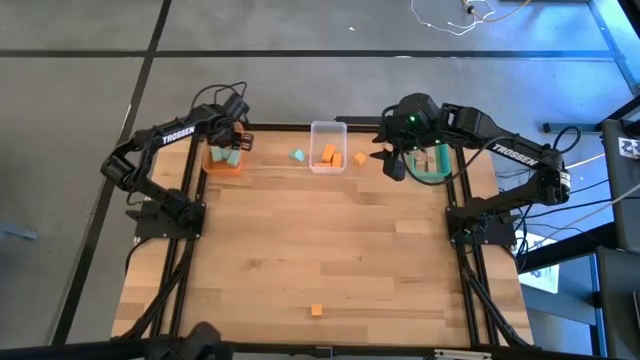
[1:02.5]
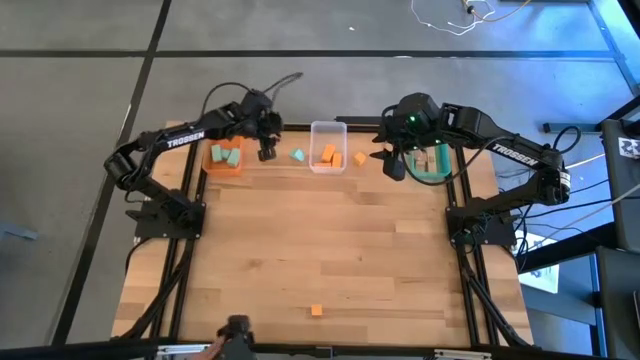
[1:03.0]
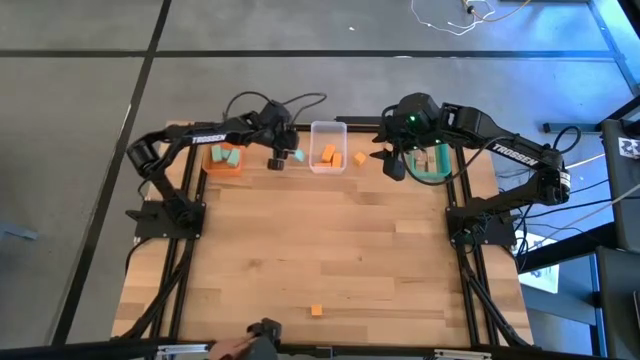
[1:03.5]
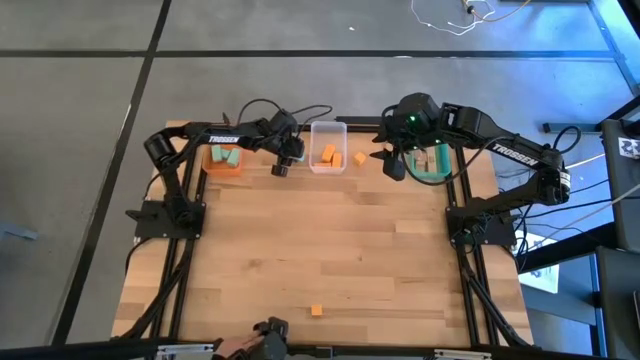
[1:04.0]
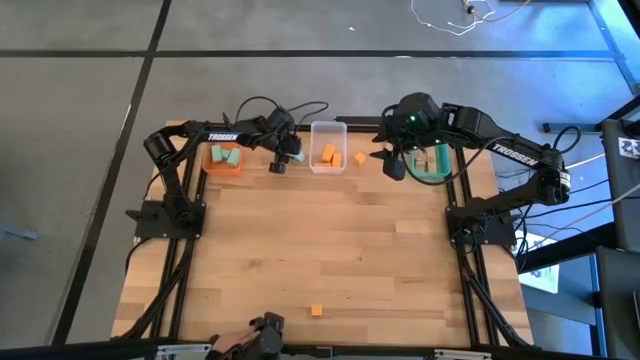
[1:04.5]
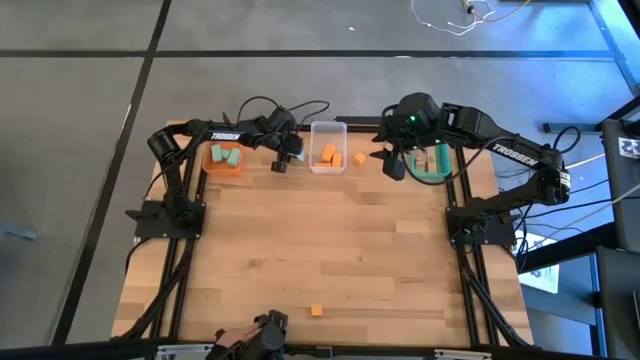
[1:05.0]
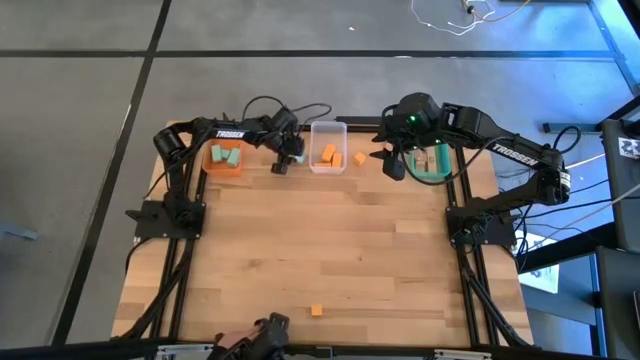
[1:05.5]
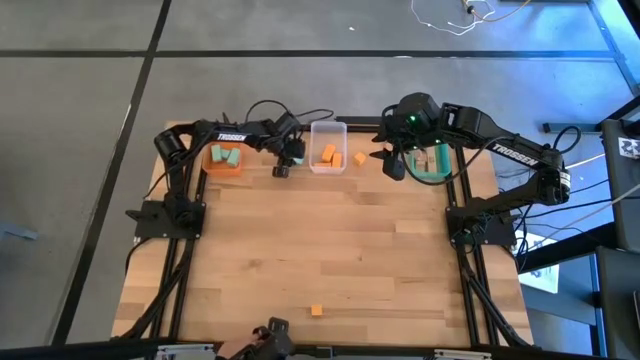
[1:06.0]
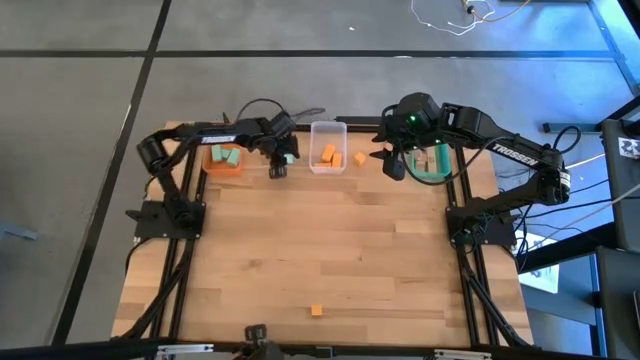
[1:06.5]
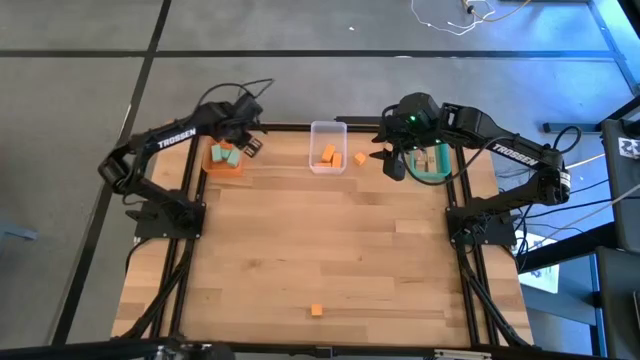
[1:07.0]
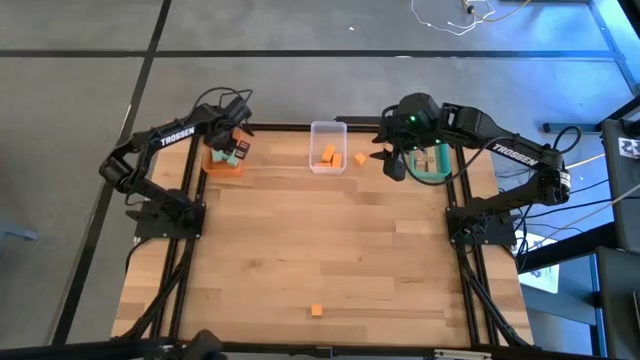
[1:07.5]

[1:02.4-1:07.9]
Task: Sort & place blocks by color
Put the blue block into the orange bin

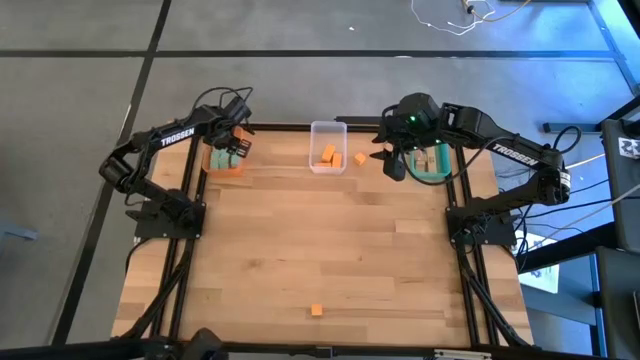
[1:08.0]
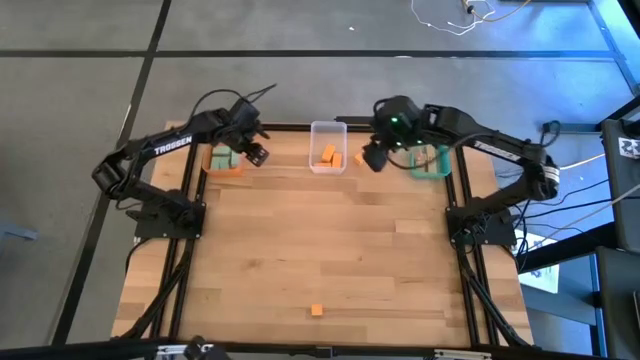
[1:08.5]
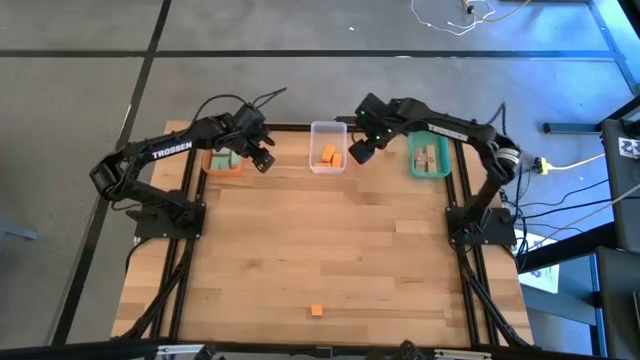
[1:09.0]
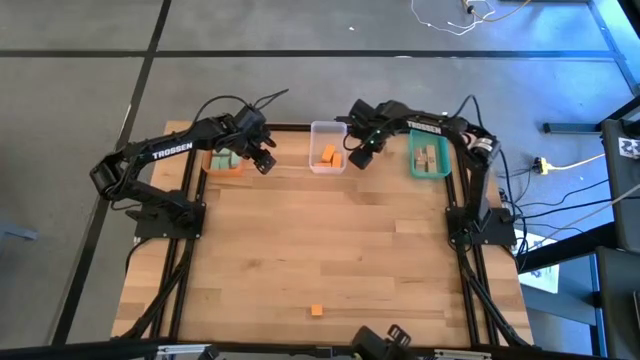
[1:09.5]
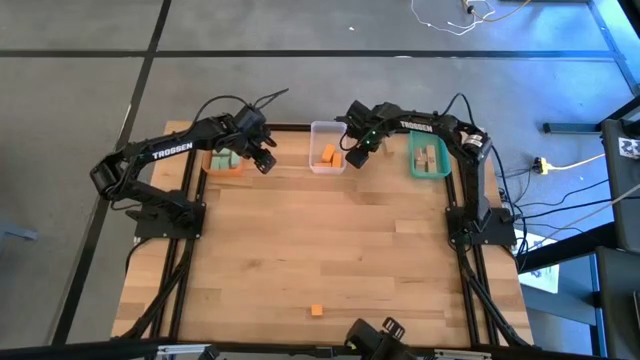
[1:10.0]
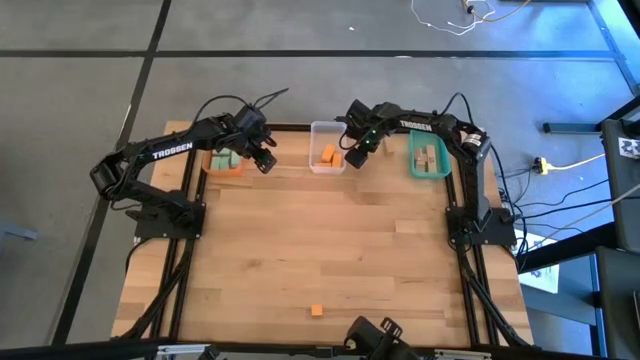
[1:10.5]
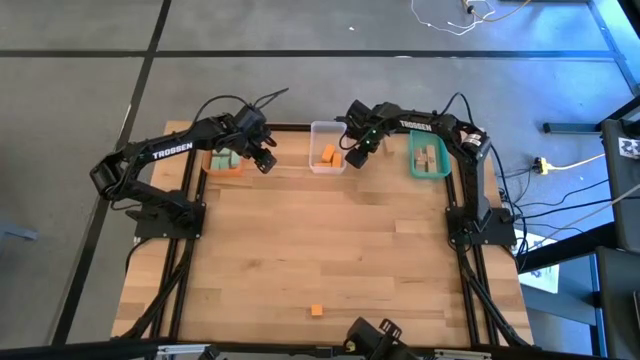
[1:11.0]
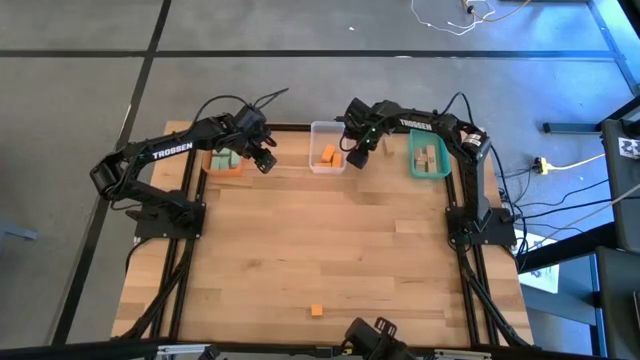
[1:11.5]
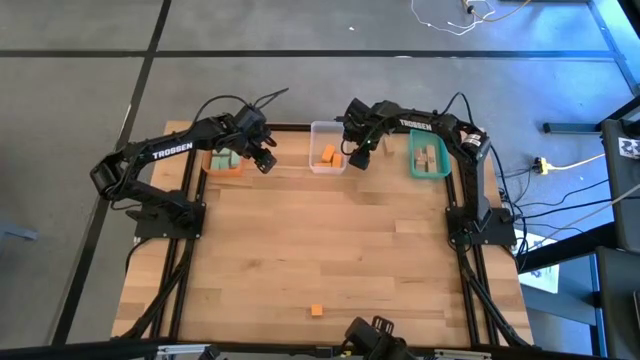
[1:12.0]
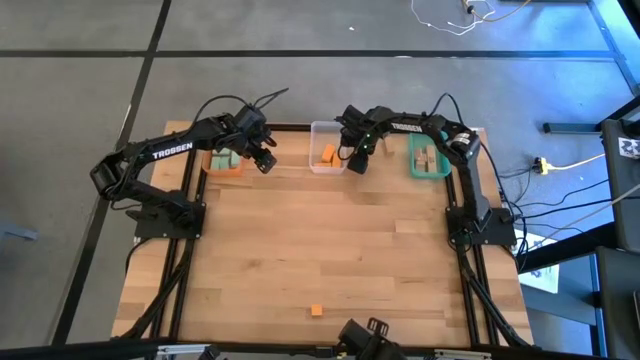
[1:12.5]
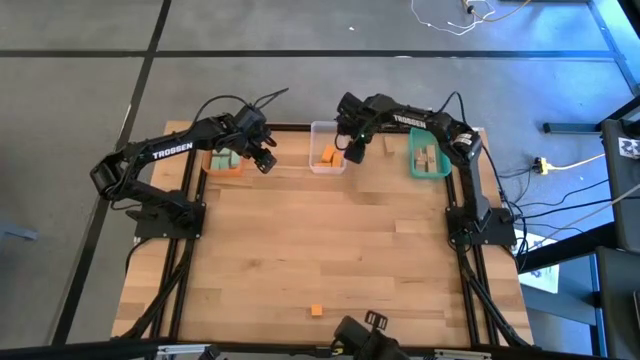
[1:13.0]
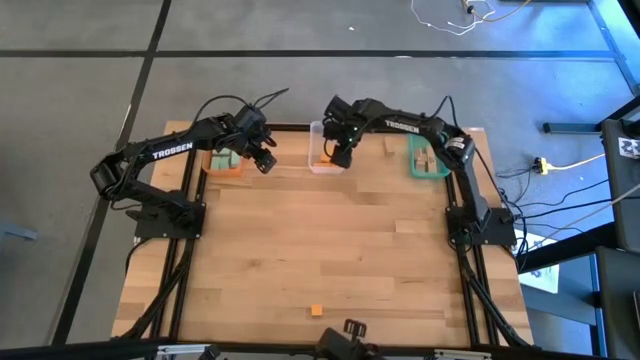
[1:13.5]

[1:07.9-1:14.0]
Put the orange block into the transparent bin

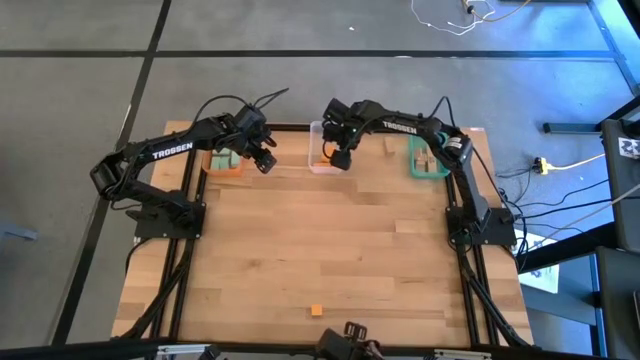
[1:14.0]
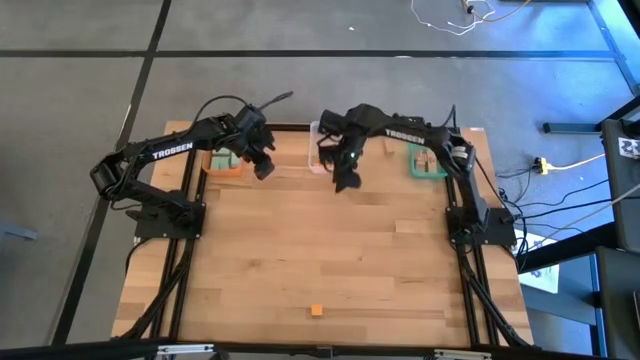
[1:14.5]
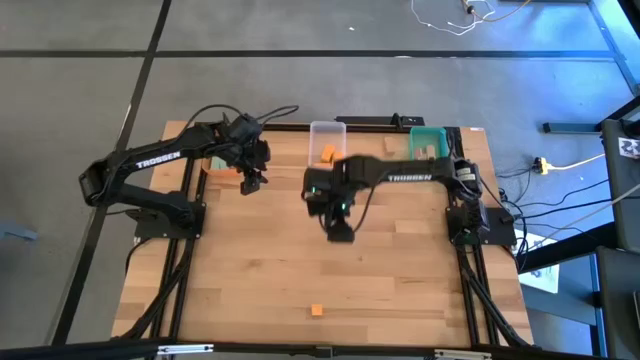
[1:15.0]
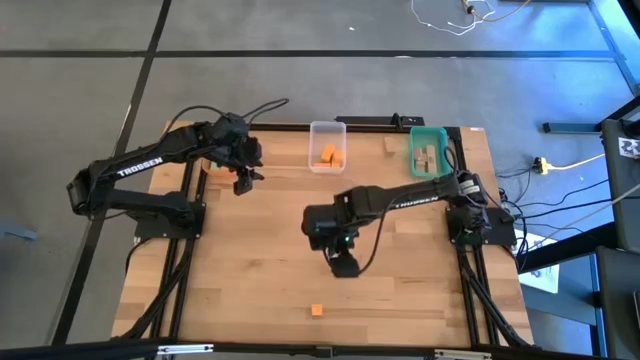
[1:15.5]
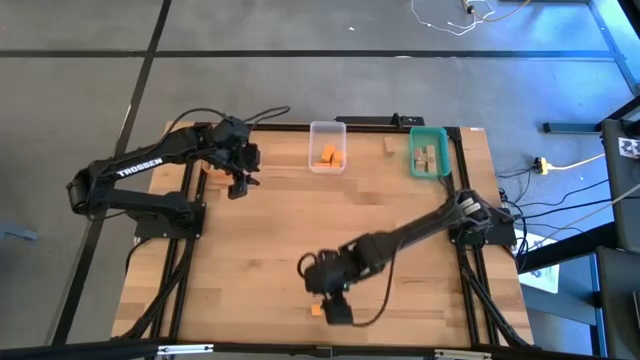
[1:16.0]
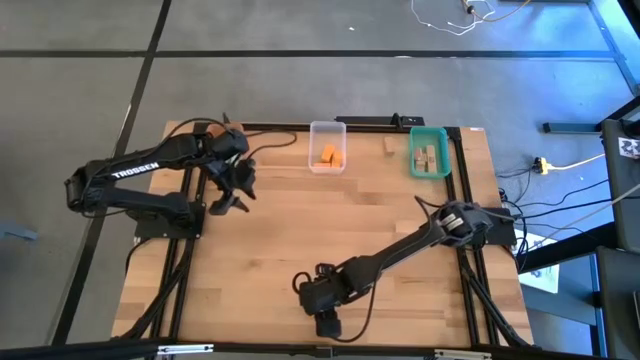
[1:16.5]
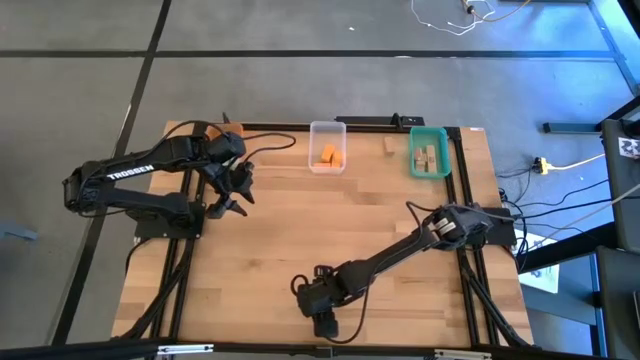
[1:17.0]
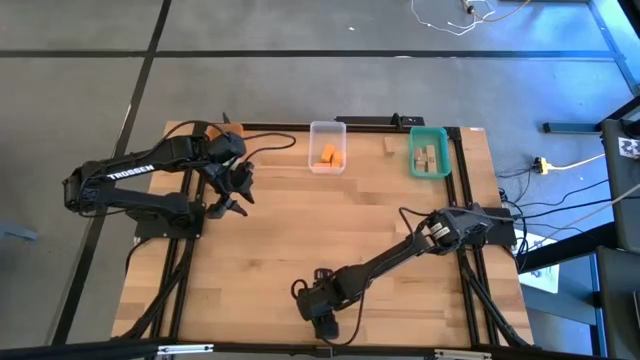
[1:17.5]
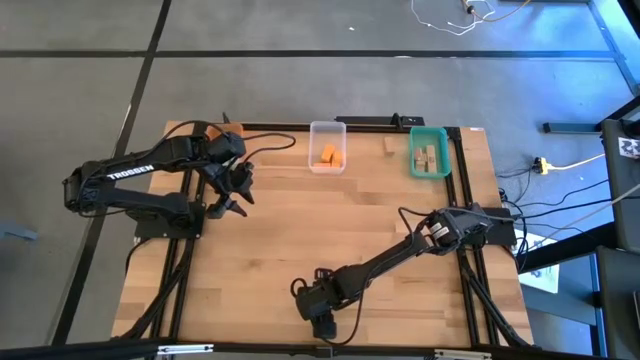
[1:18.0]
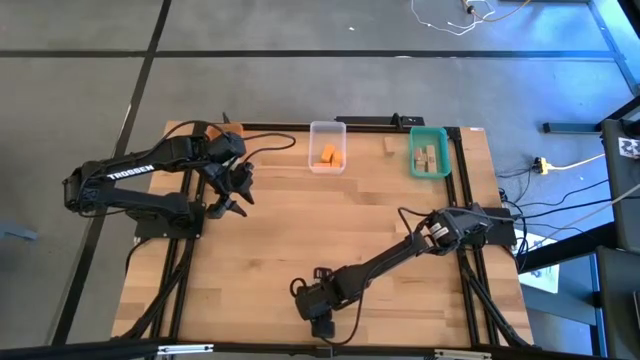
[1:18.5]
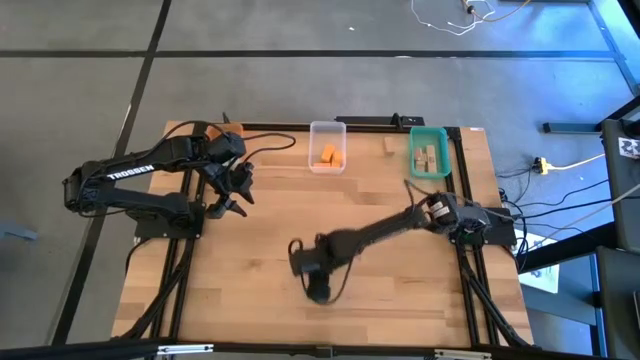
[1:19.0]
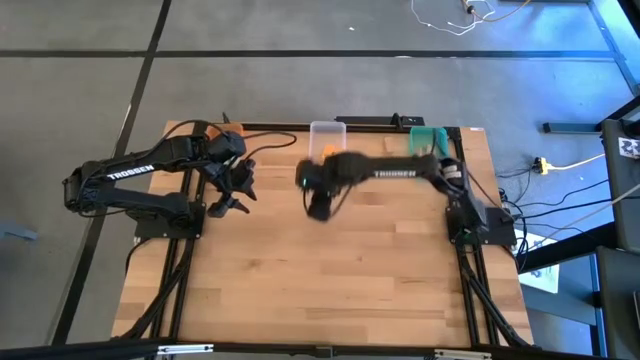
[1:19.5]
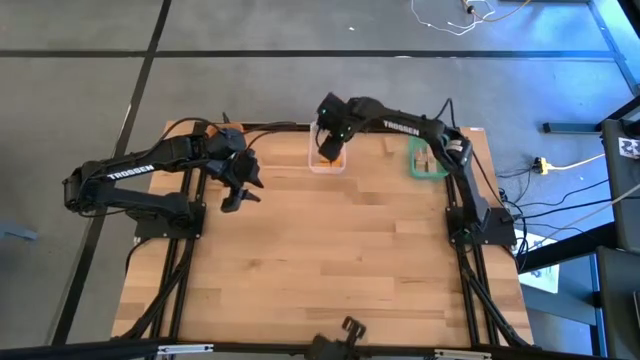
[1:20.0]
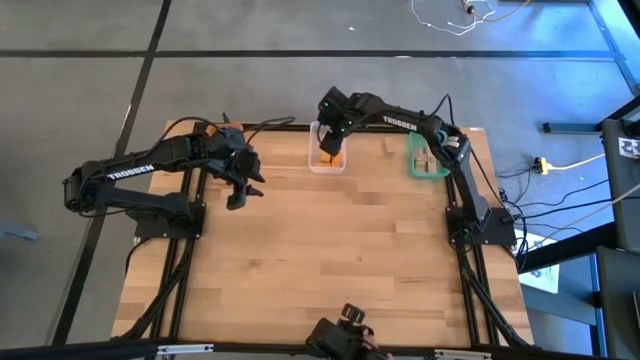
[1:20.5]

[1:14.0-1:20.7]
Put the orange block into the transparent bin

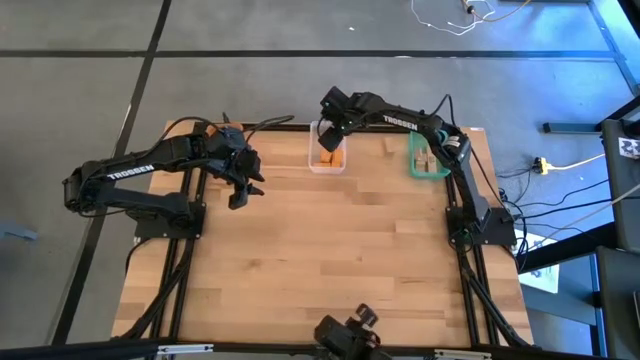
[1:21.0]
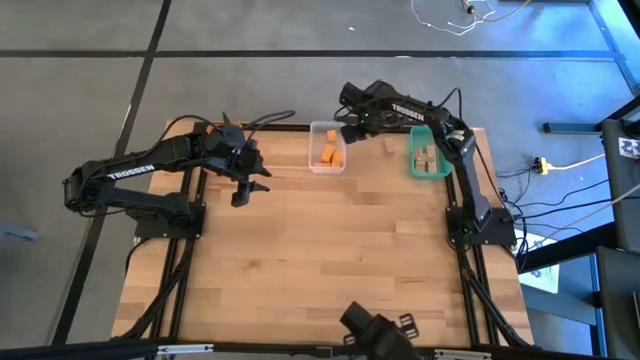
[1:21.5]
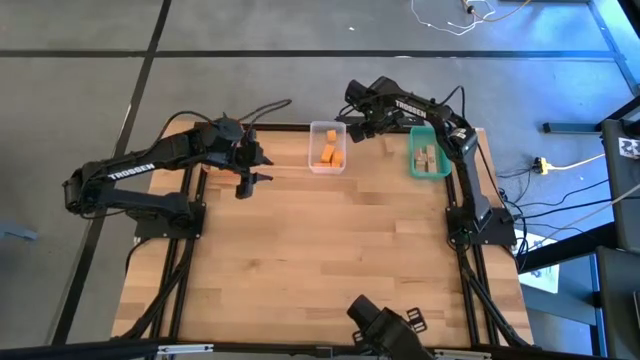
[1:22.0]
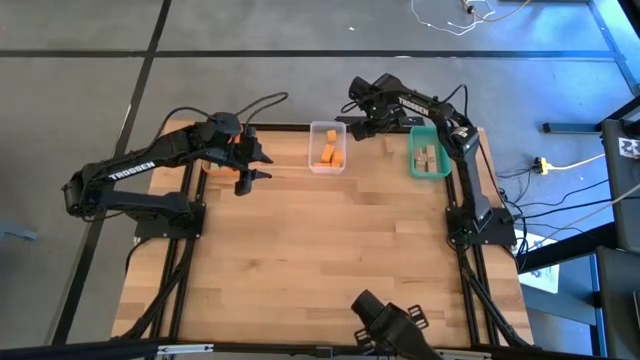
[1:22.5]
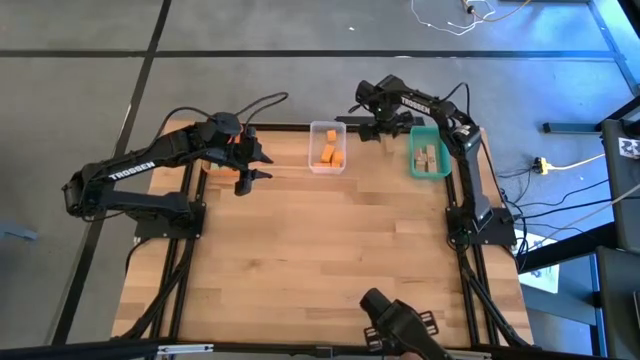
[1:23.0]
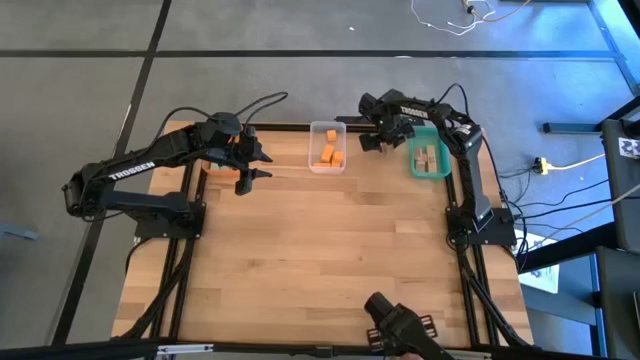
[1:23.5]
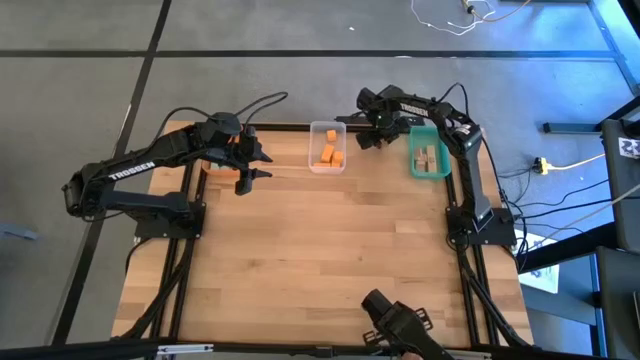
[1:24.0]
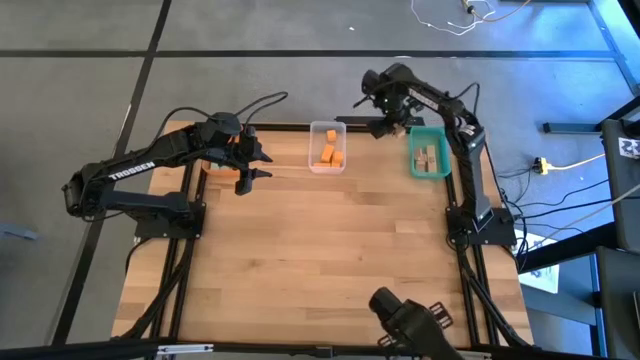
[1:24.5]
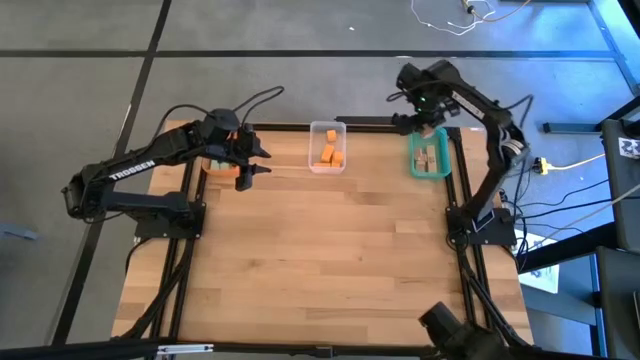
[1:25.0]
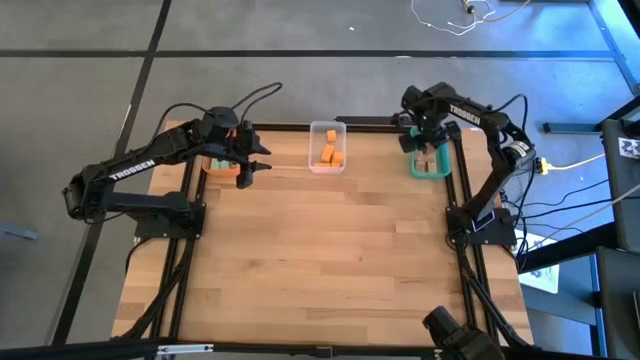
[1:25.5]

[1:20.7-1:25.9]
Put the brown block into the blue bin
